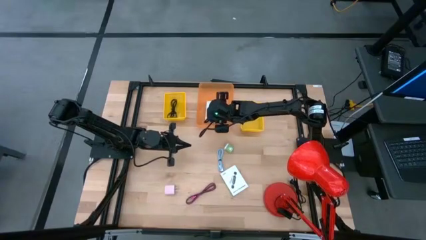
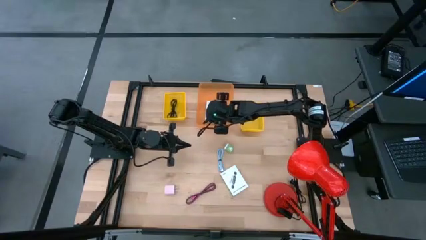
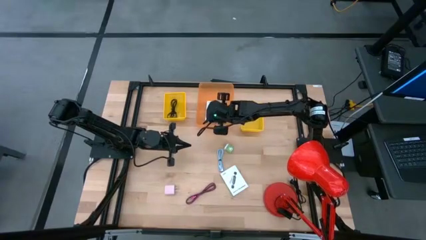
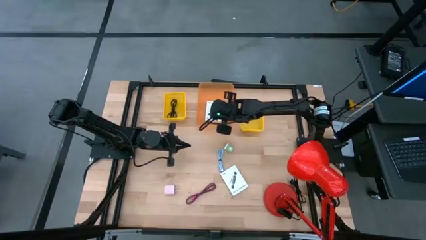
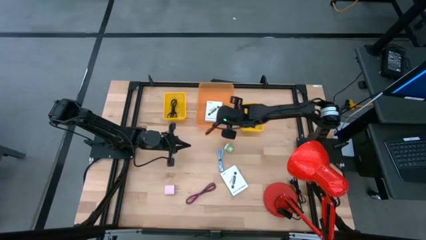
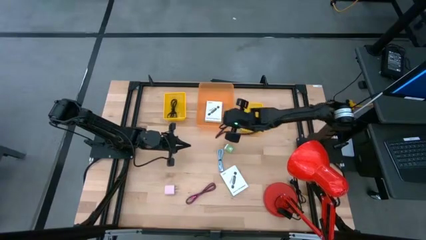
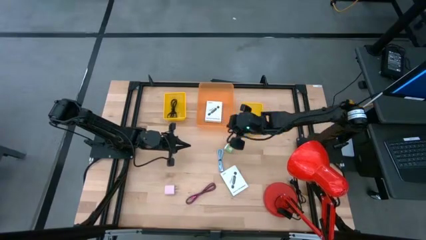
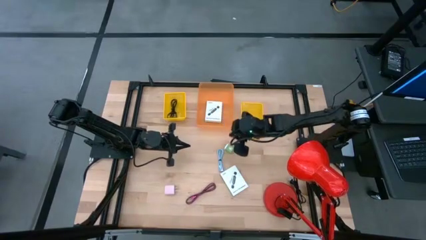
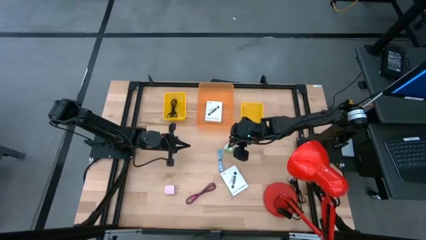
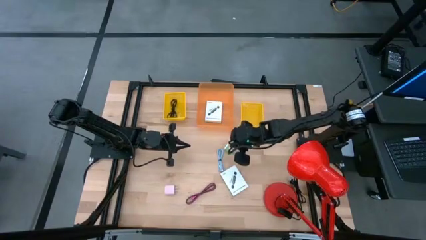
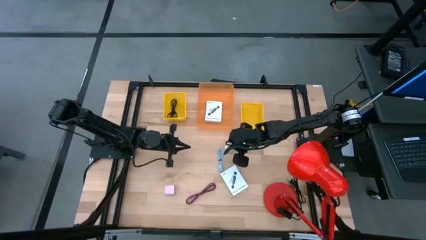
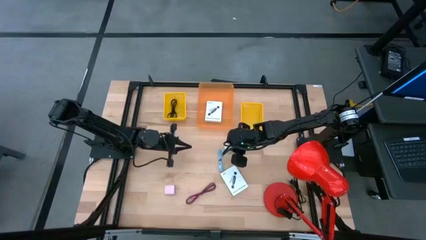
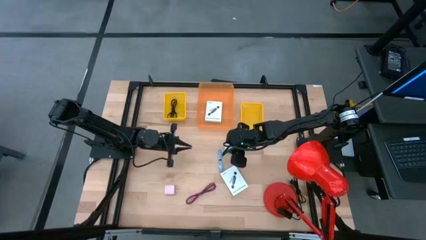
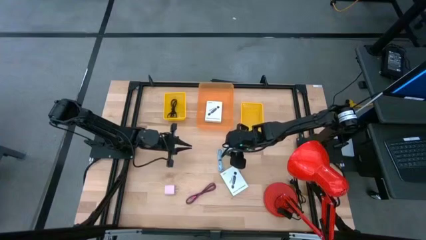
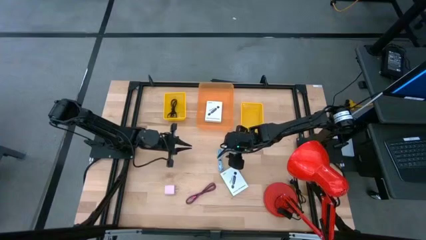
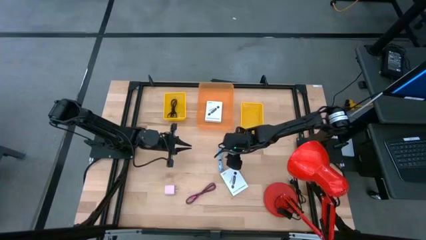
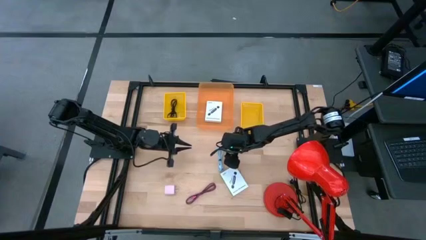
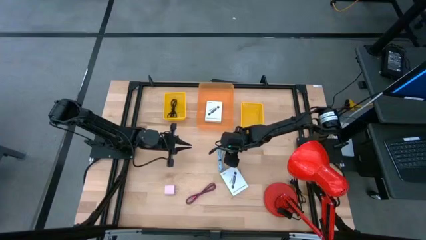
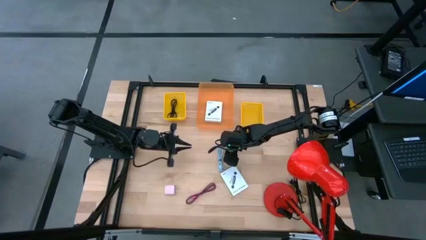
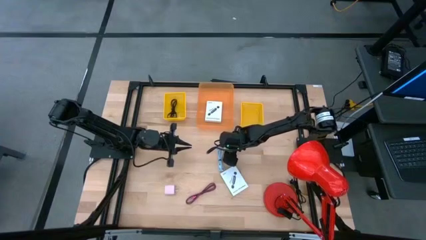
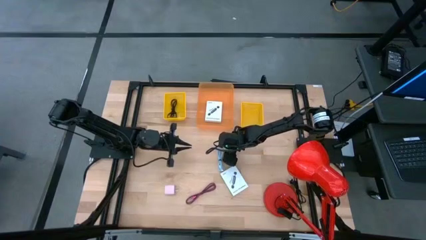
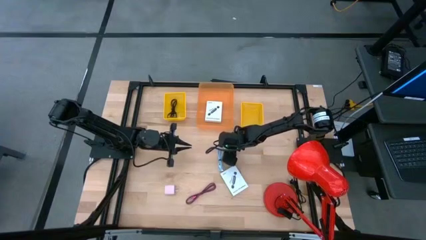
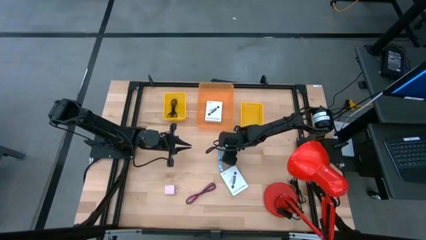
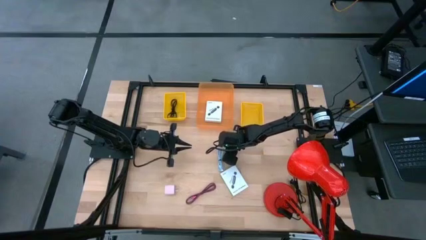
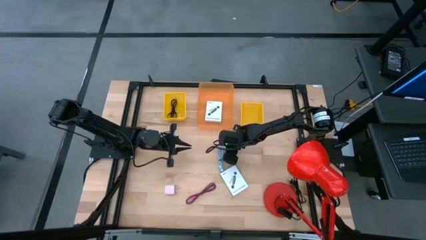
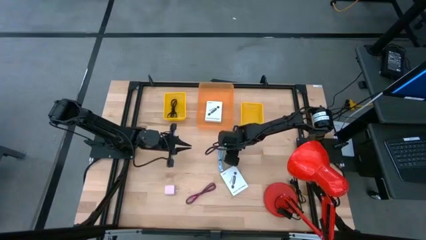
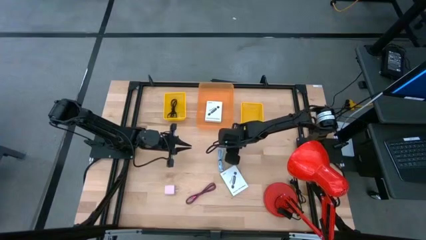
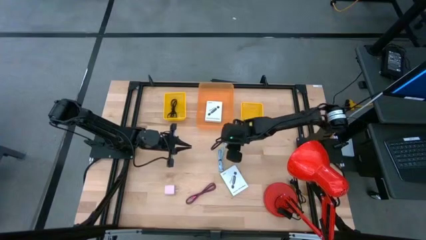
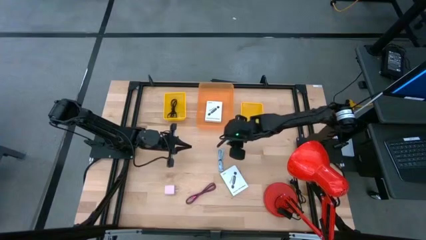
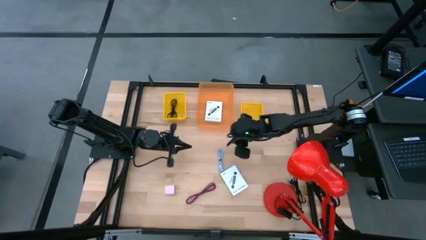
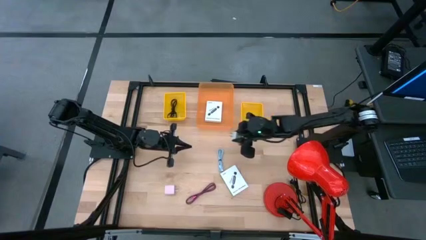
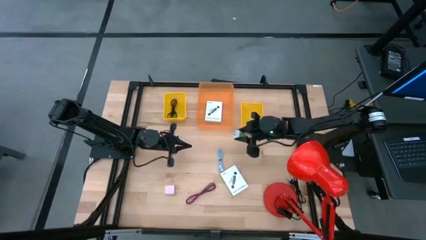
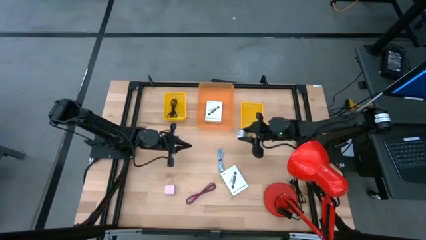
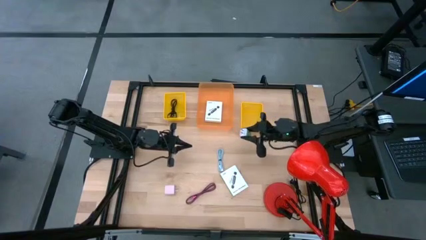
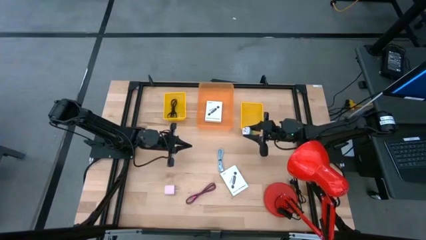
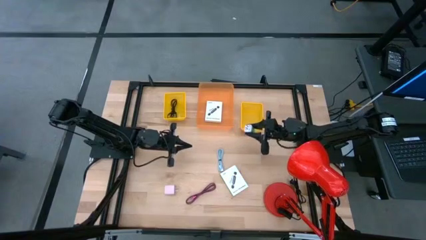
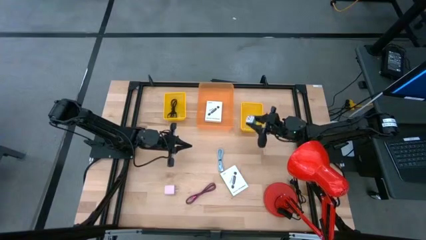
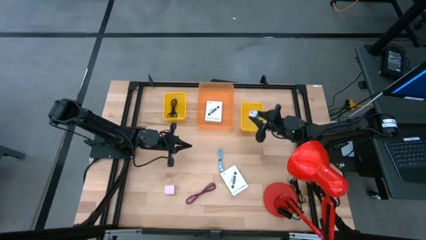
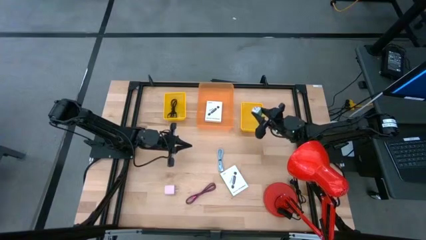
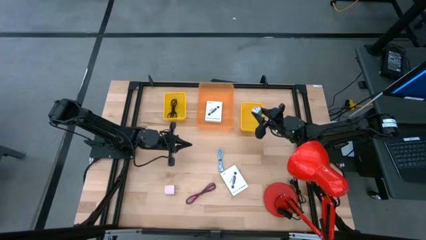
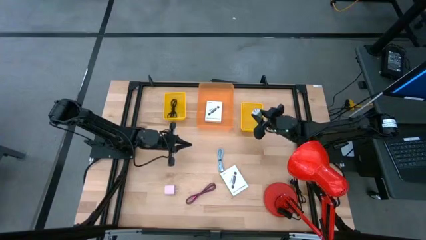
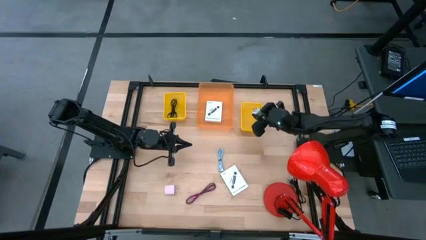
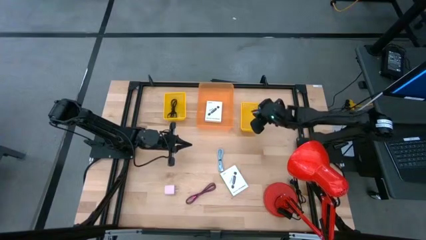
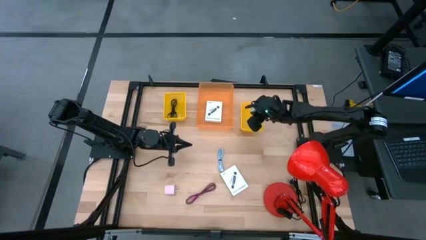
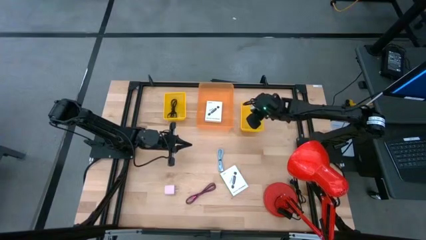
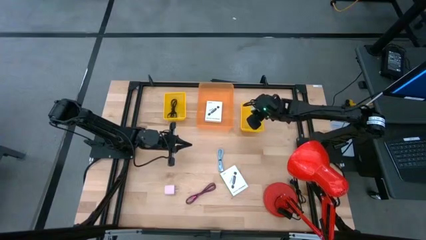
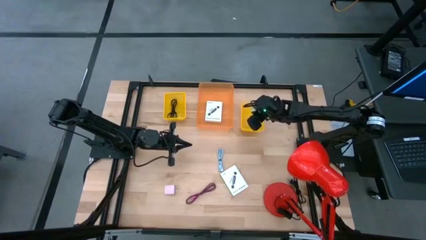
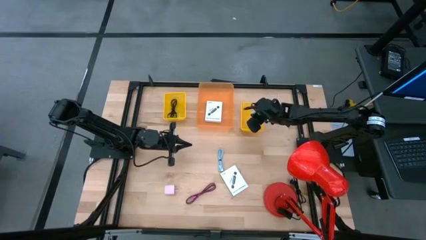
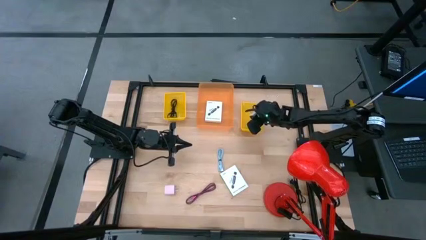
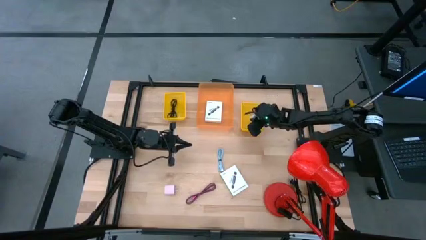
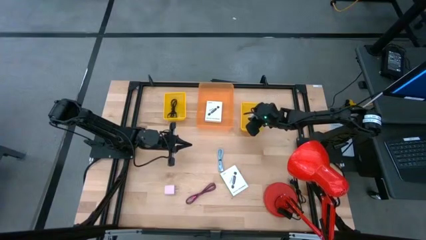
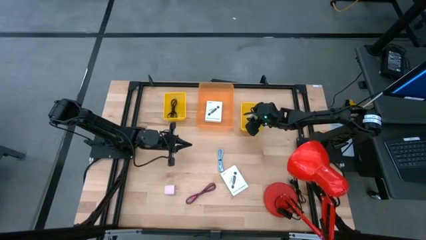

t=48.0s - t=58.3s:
Task: Pick and place items into bin
Put the green charger adapter into the right yellow bin

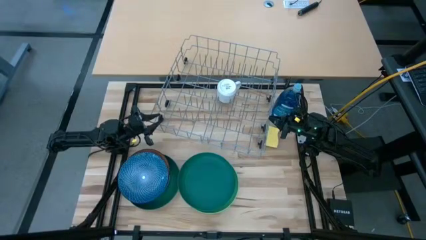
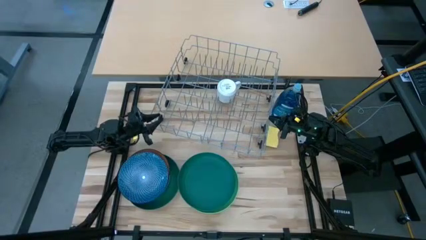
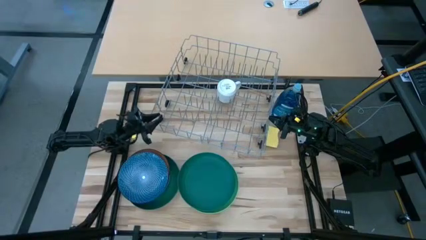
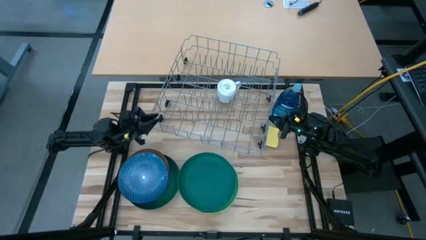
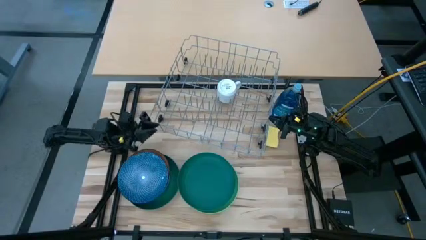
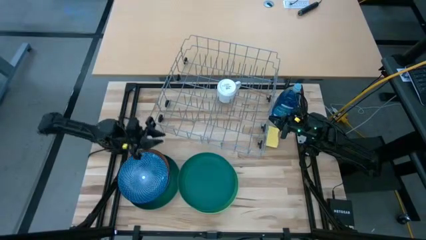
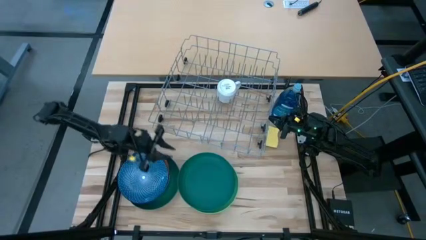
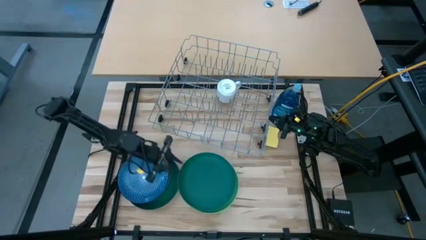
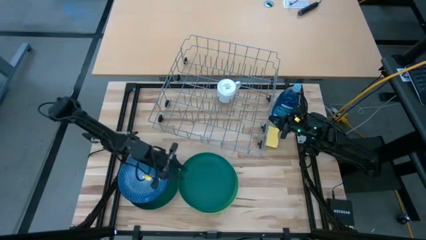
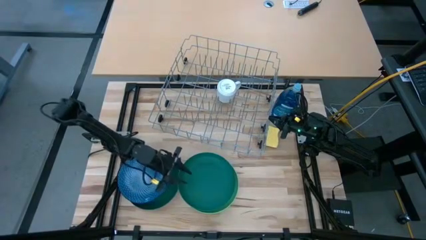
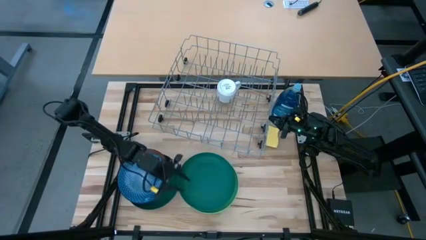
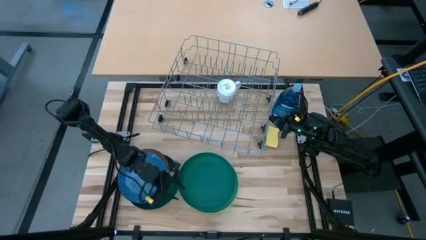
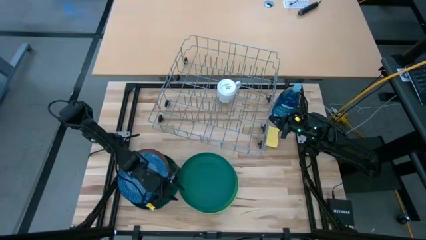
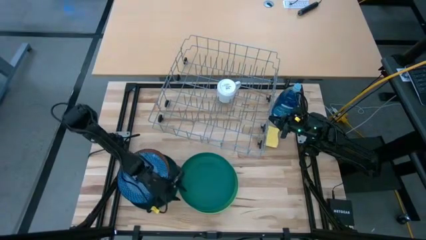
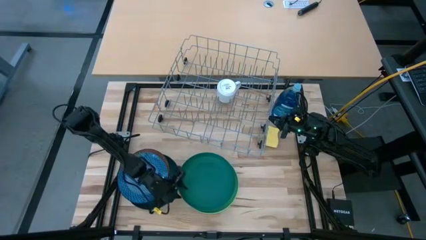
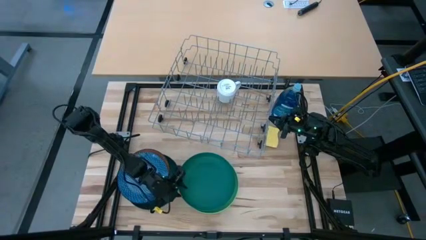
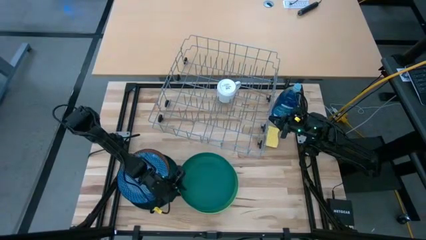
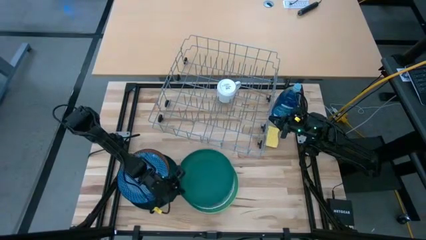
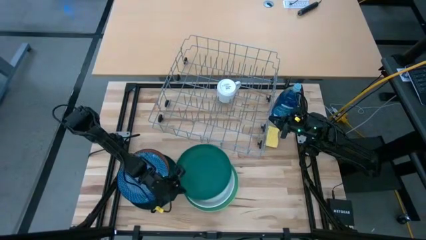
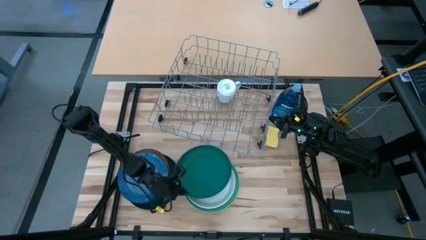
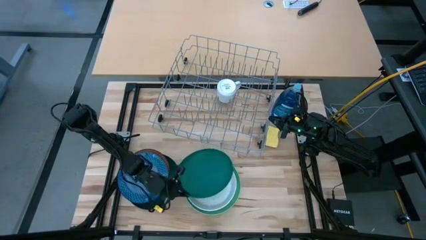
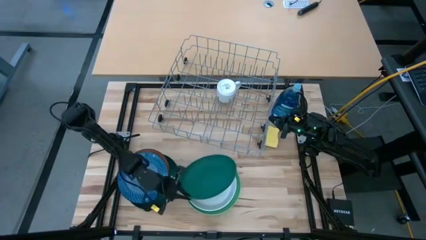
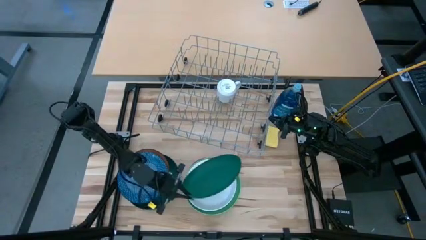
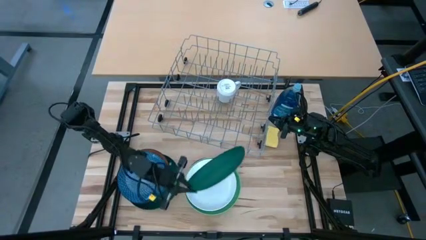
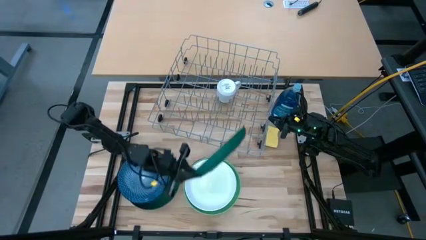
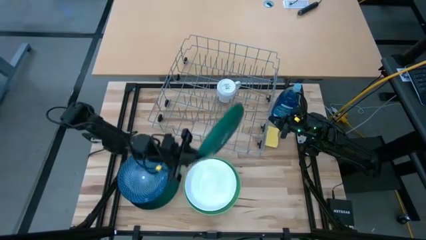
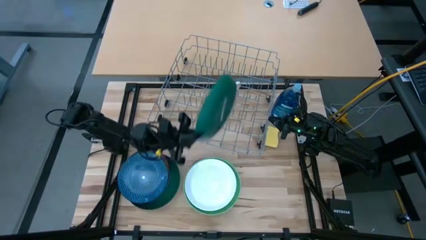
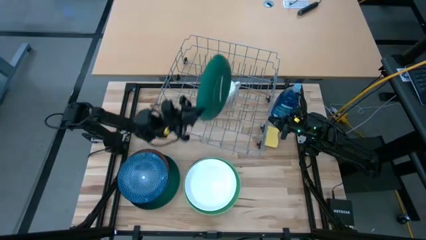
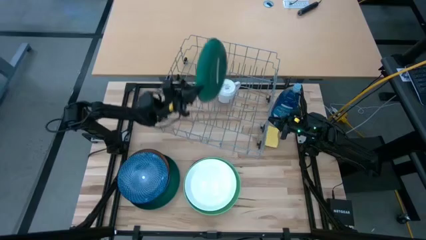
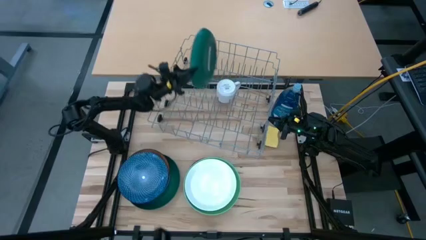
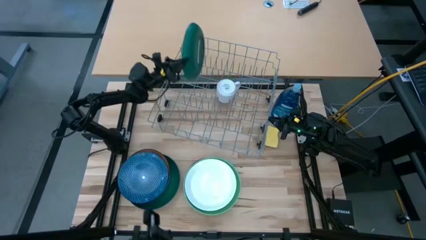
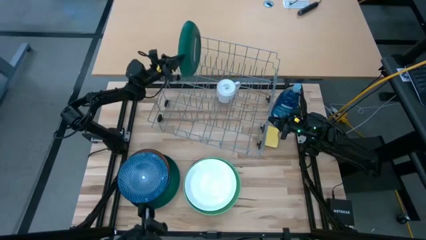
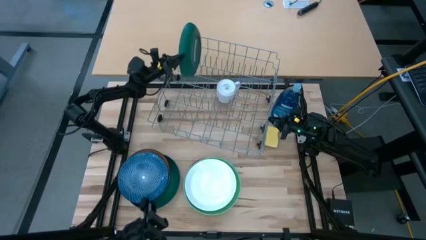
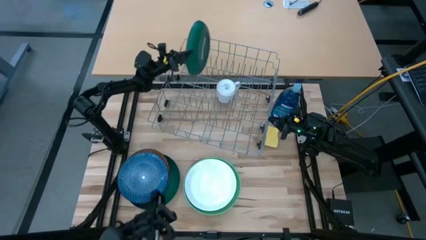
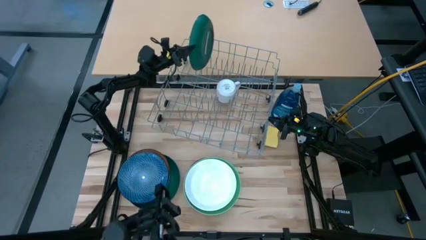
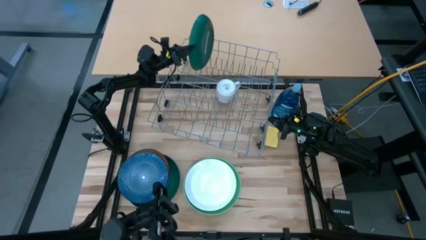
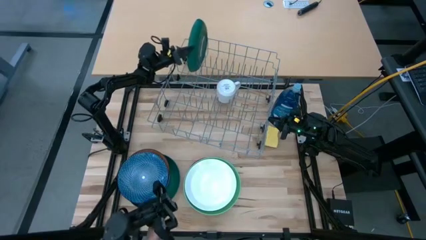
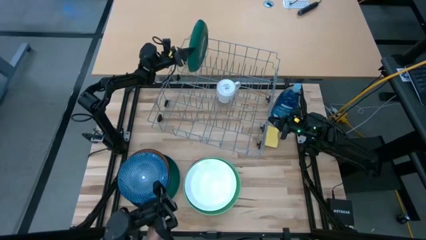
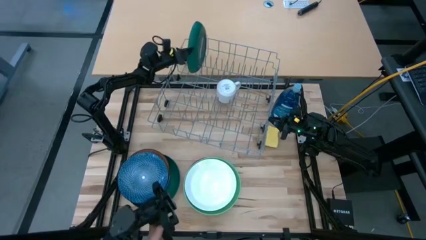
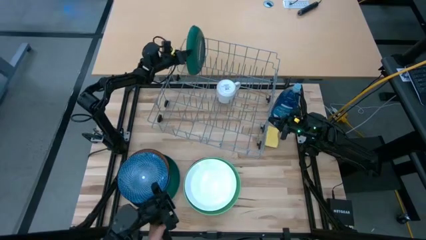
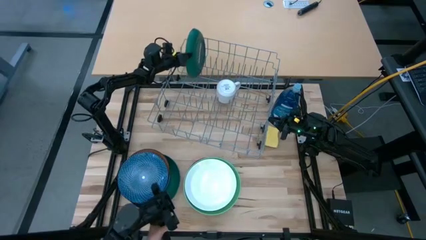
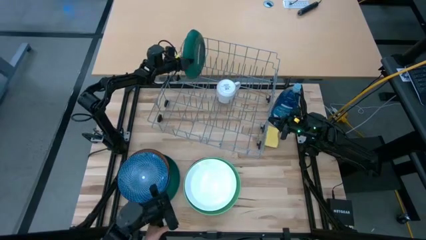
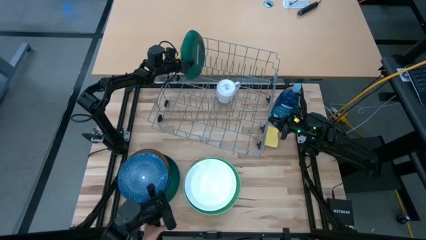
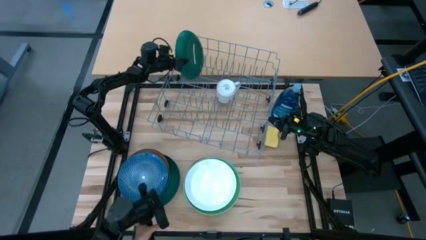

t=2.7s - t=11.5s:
Task: Sort dishes
Put the dark green plate in the dish rack
